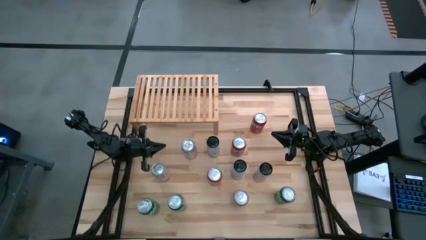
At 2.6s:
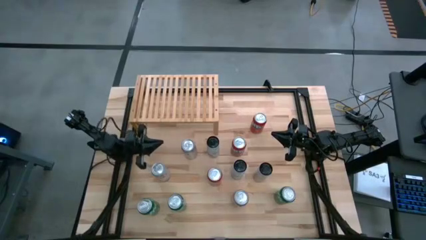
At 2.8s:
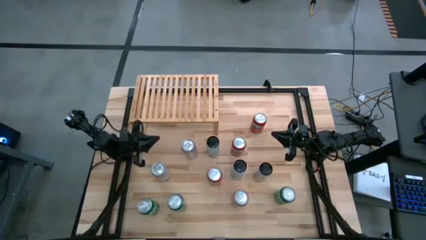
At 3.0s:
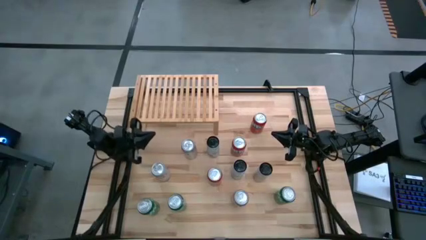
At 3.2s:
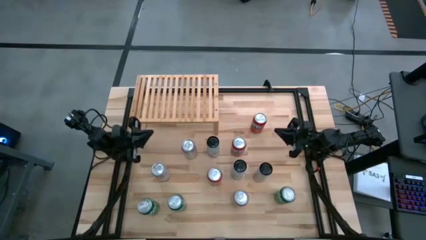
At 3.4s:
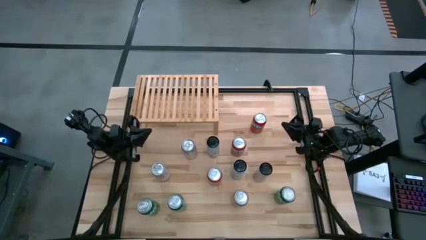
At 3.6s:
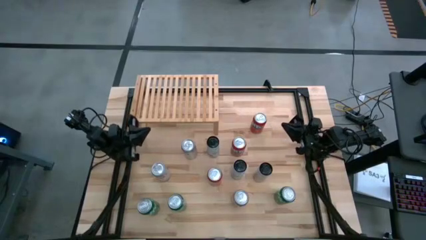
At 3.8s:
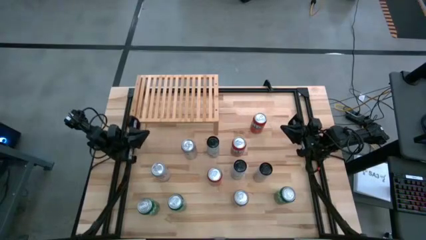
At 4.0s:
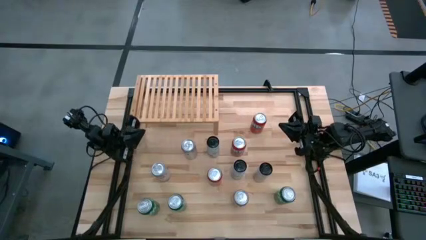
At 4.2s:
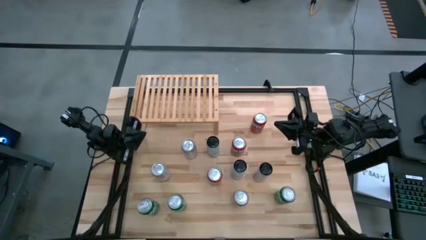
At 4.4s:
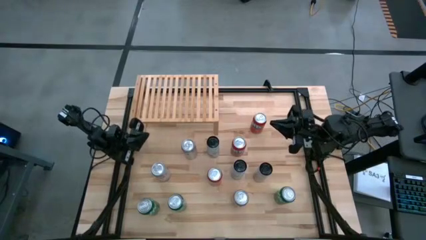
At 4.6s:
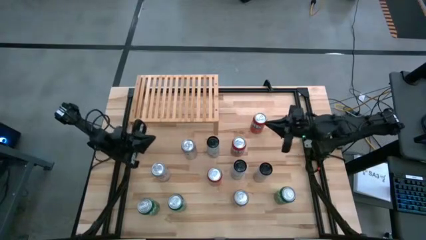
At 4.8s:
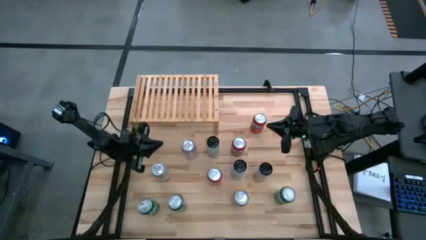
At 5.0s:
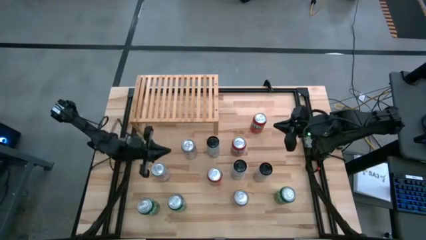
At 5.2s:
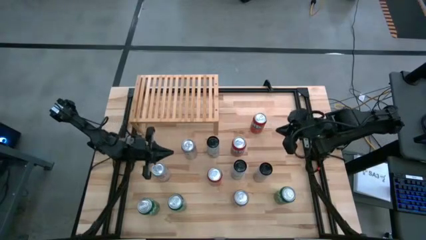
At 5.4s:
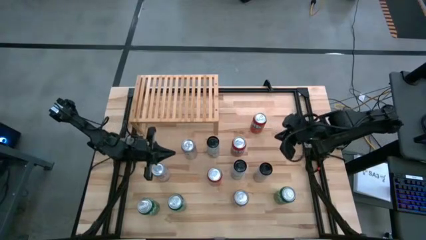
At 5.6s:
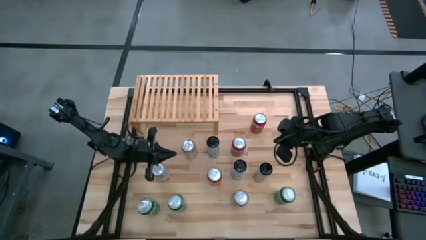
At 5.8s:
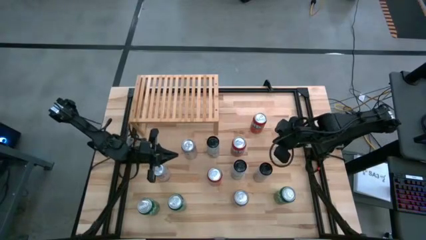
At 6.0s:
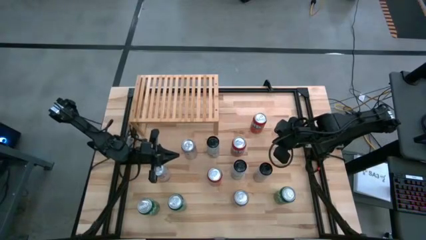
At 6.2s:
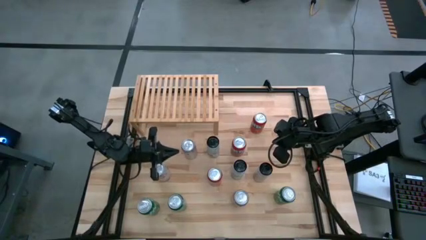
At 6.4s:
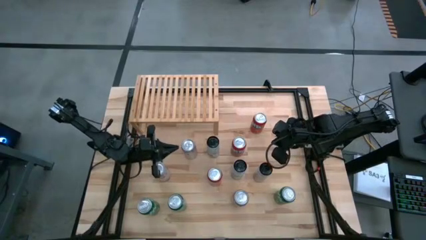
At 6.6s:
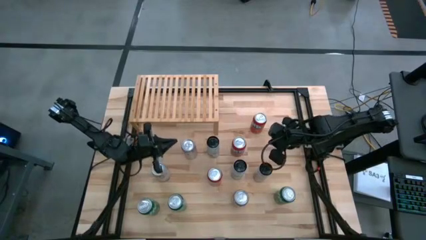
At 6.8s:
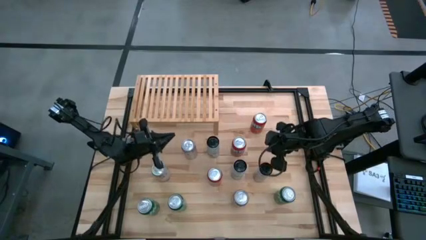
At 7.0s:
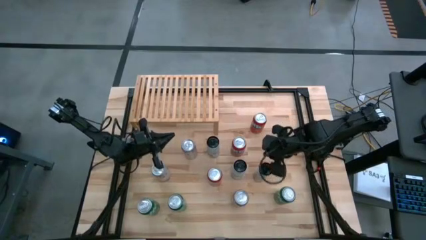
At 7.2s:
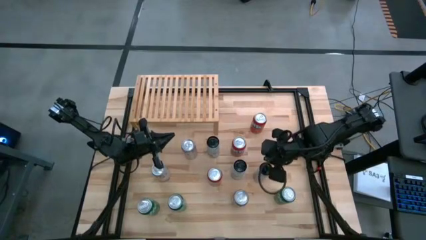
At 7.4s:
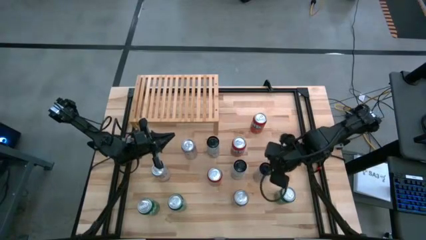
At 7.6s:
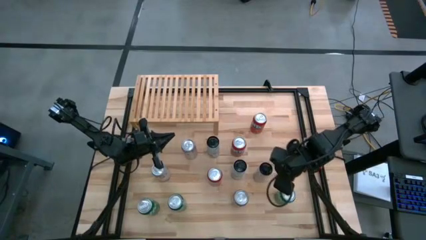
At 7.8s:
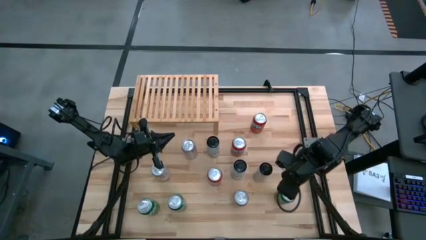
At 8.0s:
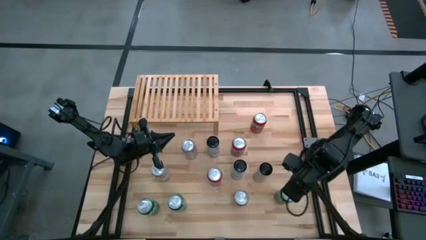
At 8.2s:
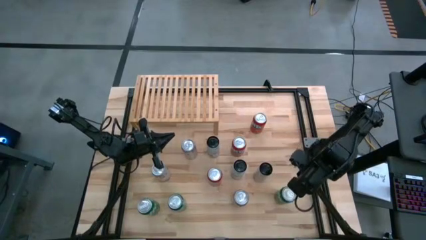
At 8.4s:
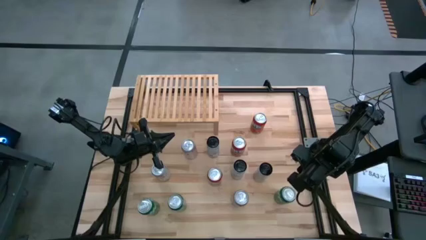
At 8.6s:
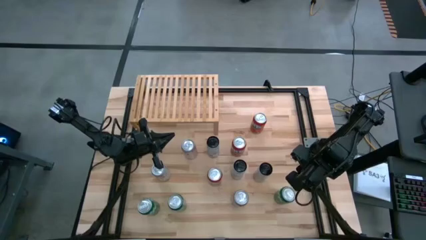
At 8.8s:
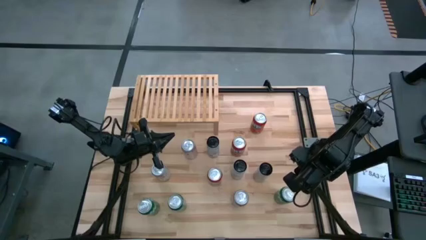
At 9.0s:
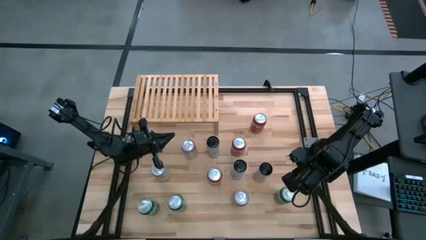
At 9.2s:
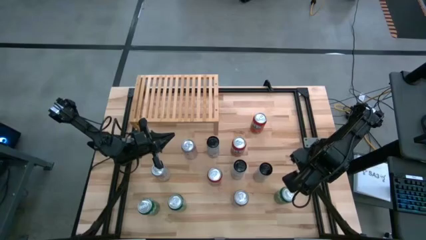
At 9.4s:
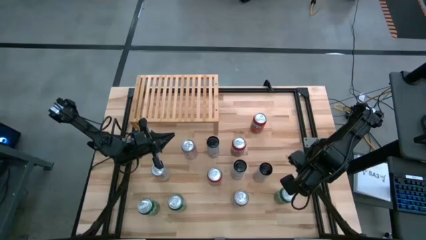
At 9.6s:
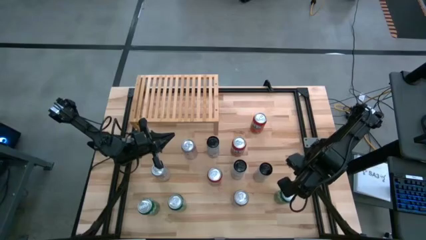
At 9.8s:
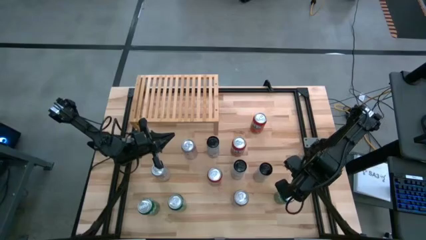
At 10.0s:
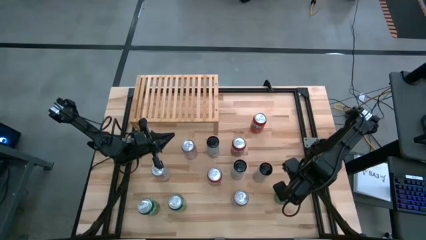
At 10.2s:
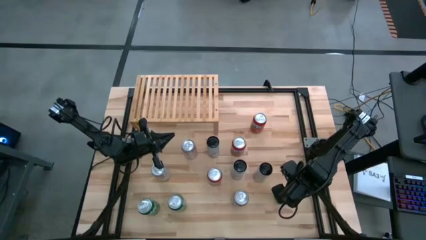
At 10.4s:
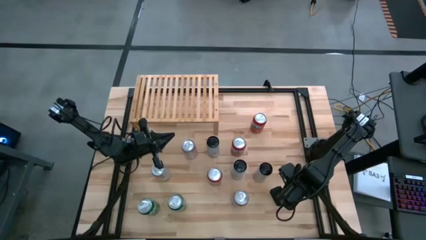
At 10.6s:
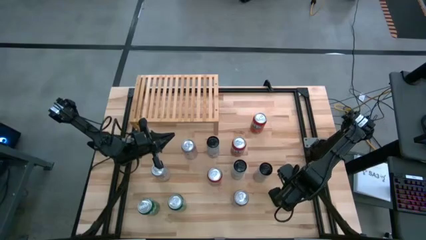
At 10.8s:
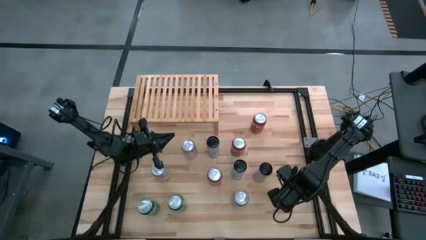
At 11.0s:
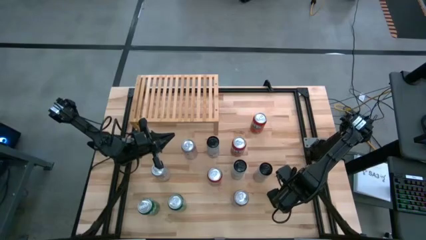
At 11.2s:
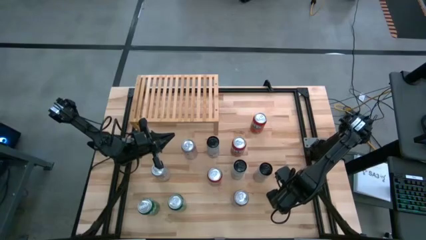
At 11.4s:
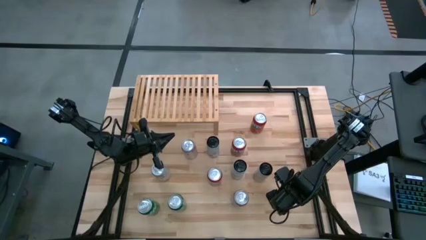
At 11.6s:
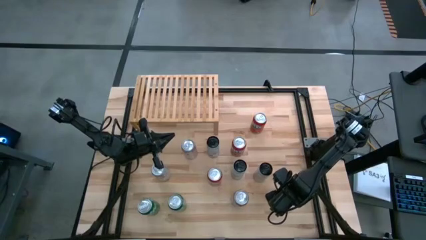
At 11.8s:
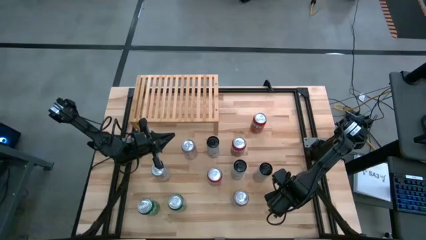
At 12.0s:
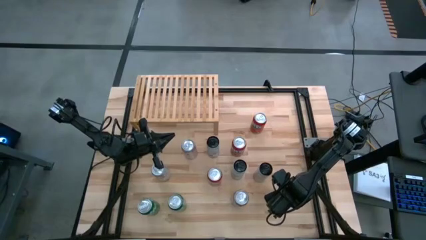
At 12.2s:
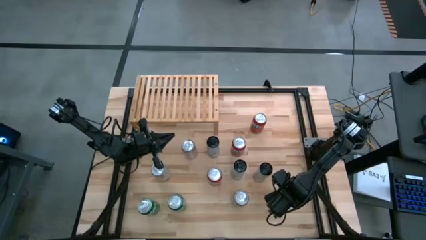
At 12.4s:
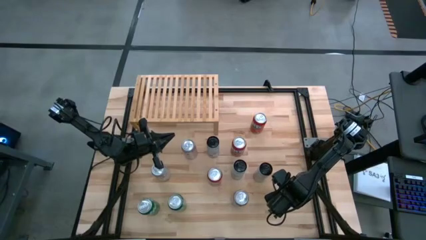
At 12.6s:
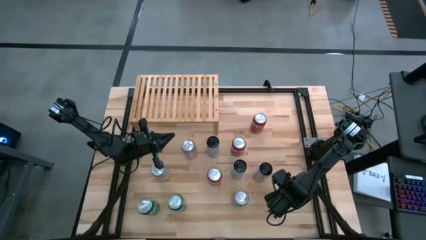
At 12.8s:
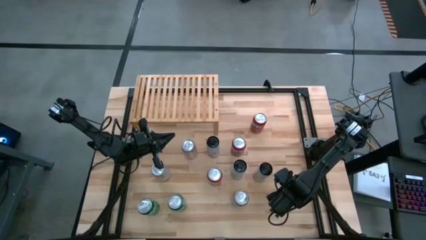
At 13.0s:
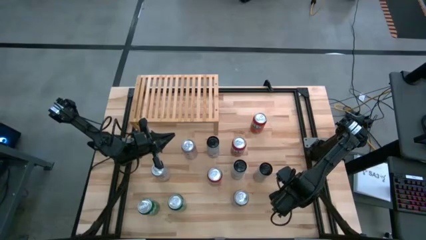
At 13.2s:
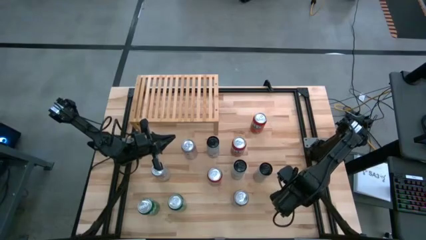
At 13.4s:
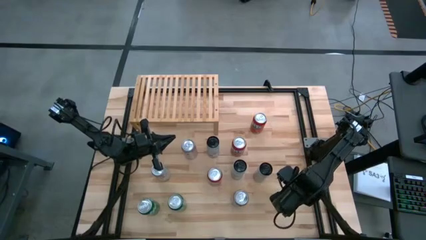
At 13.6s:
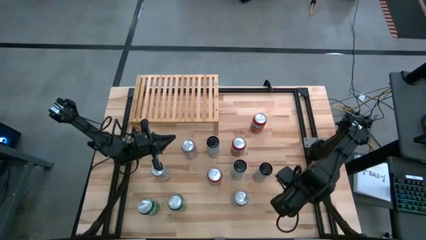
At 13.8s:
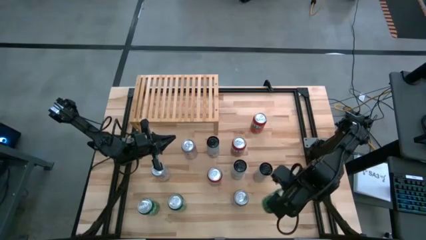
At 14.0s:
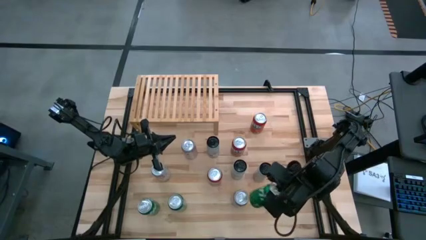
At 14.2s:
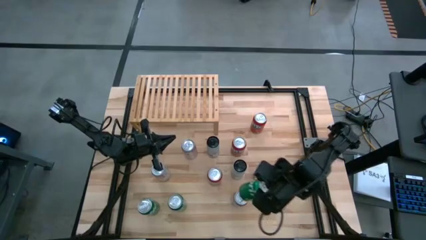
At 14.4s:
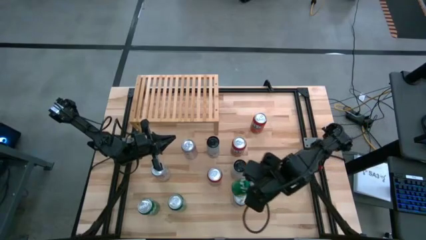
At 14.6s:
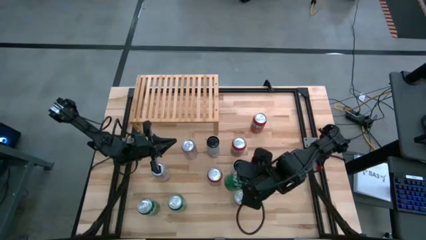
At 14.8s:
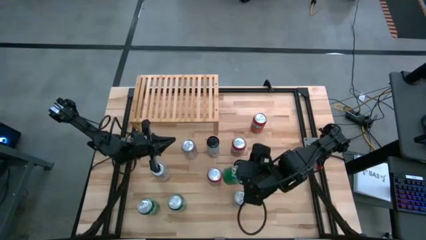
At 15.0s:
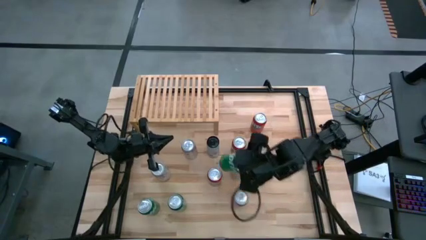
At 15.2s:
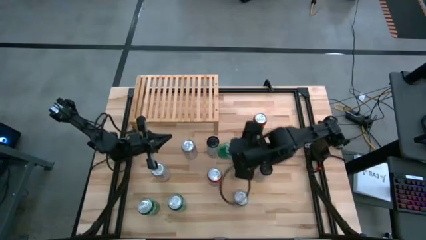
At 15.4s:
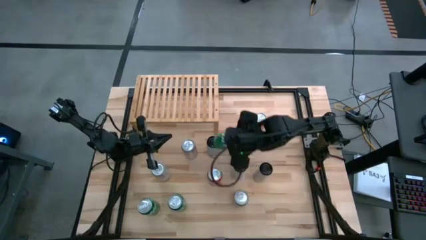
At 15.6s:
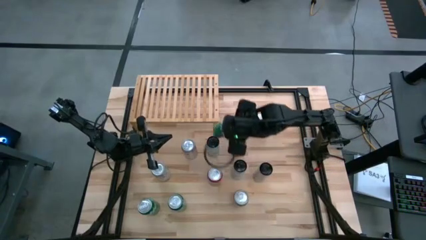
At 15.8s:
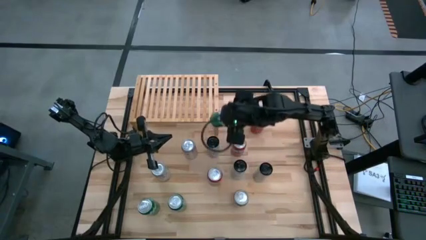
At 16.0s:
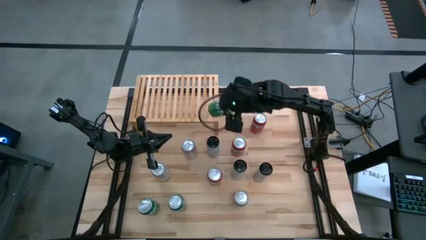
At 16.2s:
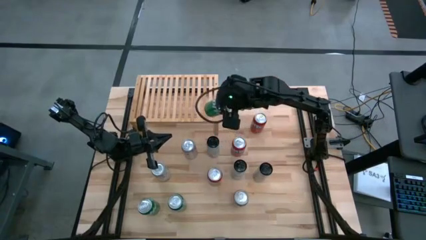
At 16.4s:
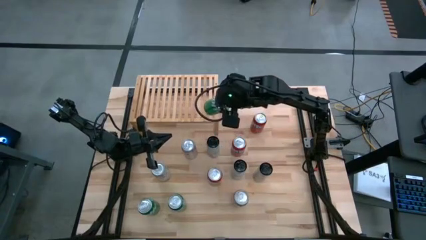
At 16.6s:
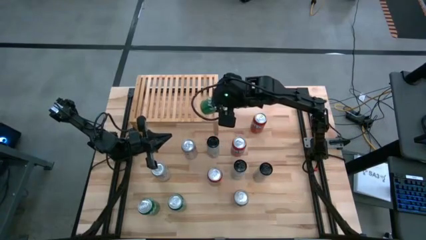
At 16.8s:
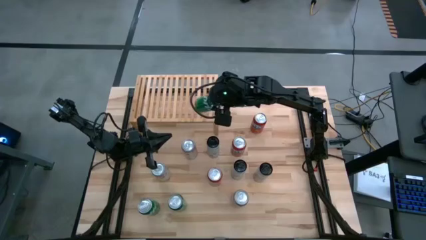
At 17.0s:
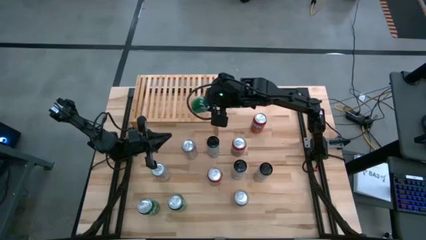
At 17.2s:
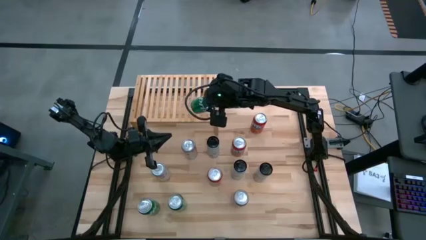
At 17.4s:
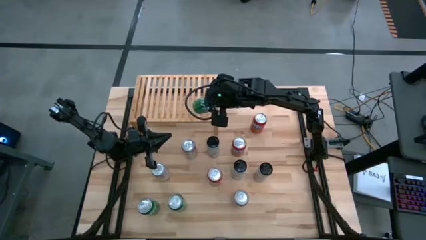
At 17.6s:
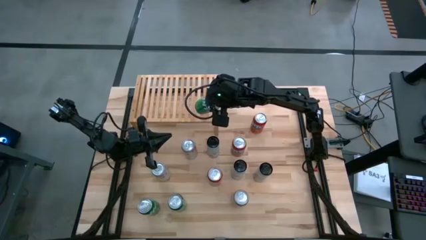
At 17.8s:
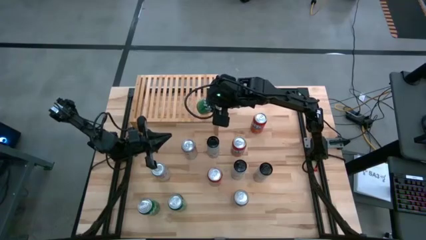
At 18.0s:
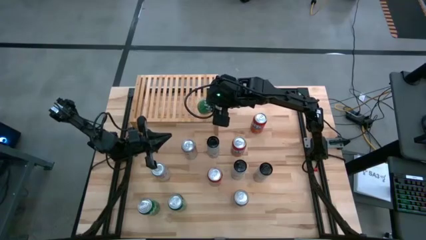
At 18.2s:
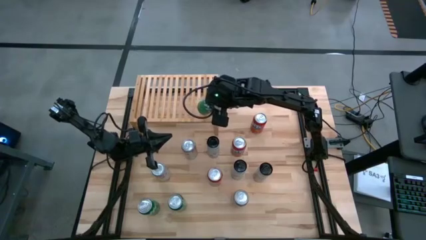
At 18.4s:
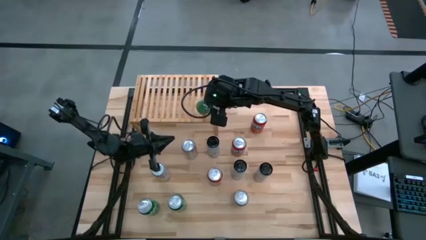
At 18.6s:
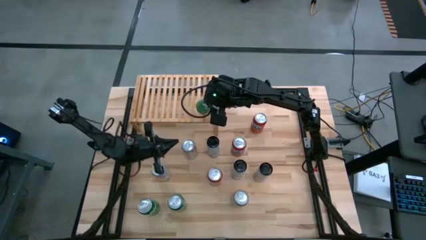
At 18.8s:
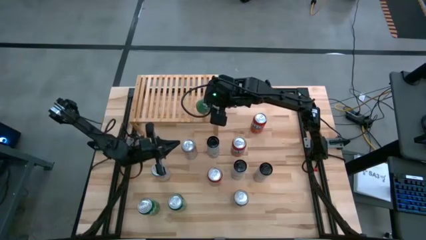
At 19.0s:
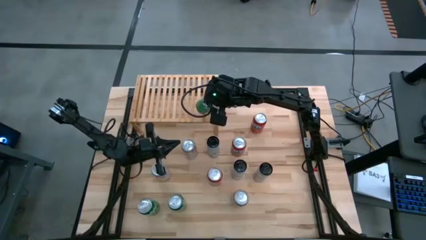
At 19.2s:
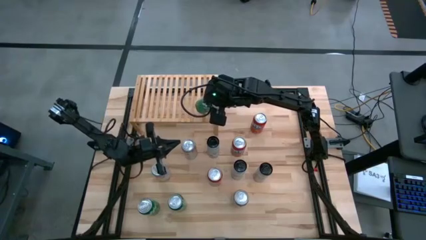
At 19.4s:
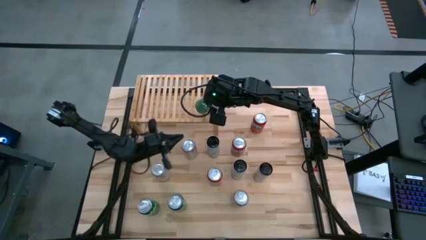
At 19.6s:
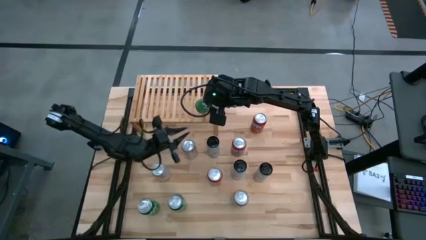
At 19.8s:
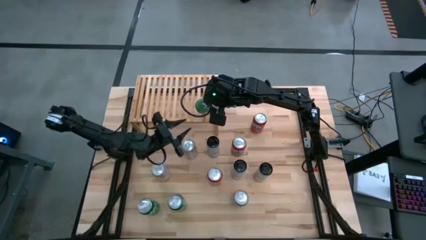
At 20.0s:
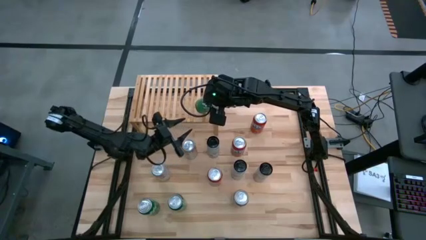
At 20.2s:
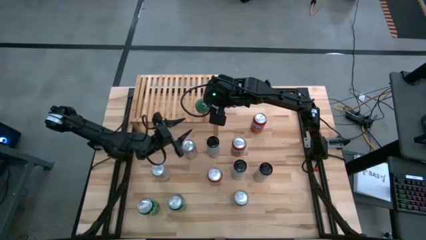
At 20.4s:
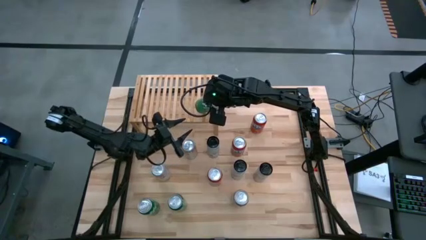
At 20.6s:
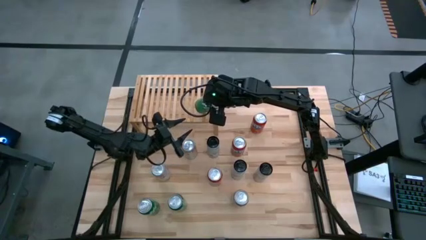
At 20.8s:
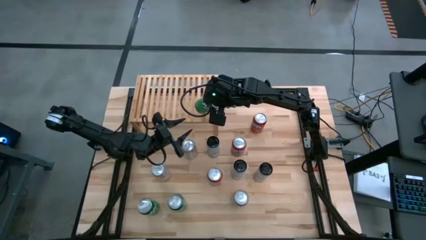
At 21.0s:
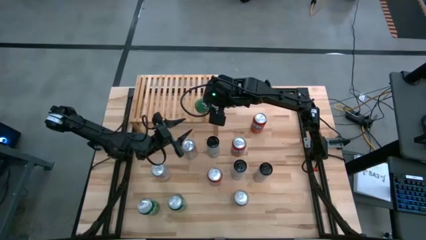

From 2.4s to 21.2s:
Task: Place canned beverage on shelf
Put the right green soda can on the shelf
